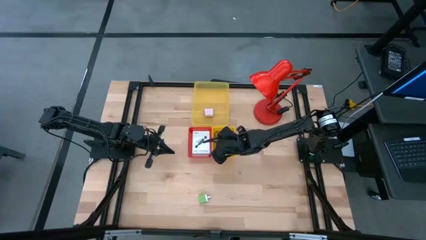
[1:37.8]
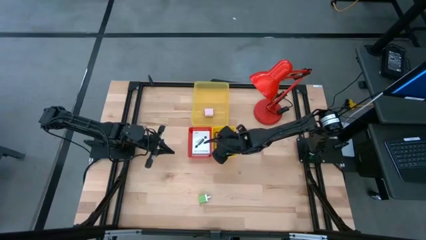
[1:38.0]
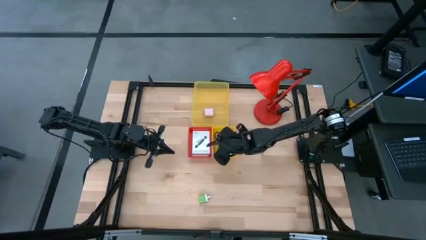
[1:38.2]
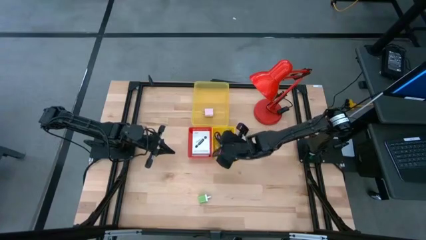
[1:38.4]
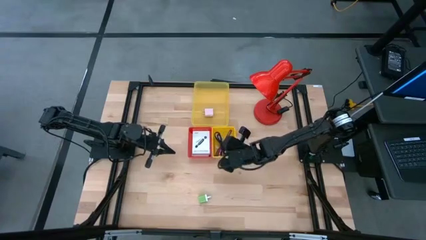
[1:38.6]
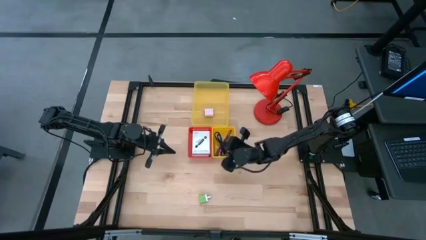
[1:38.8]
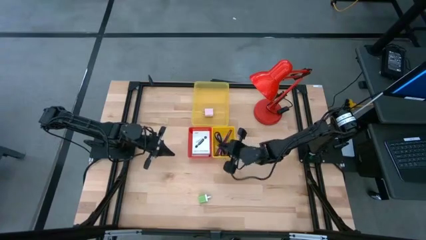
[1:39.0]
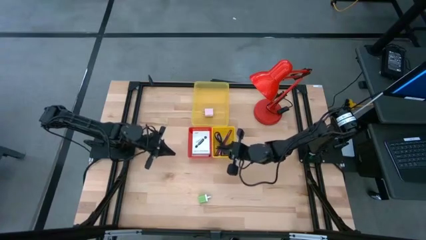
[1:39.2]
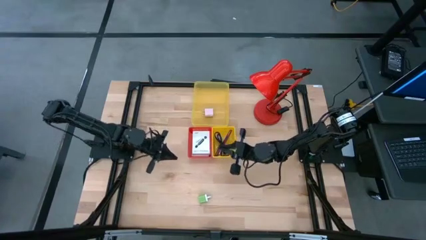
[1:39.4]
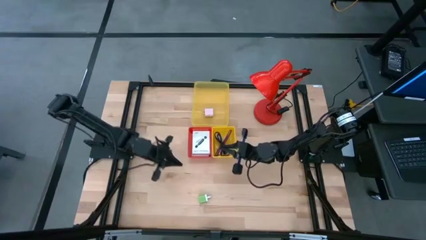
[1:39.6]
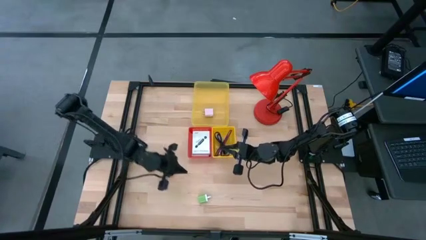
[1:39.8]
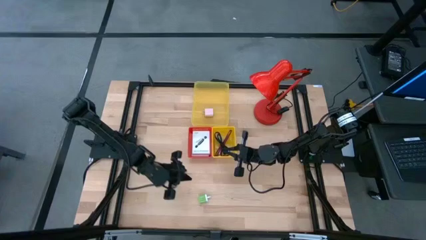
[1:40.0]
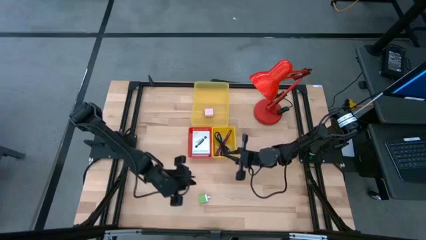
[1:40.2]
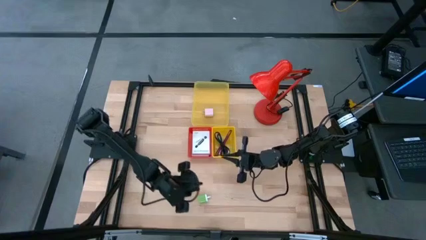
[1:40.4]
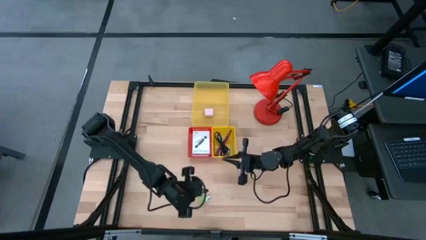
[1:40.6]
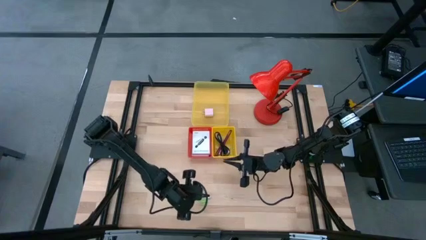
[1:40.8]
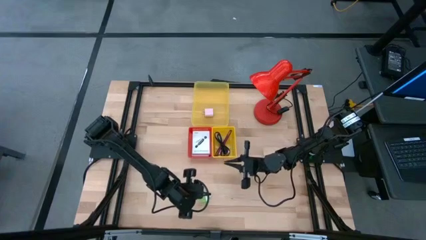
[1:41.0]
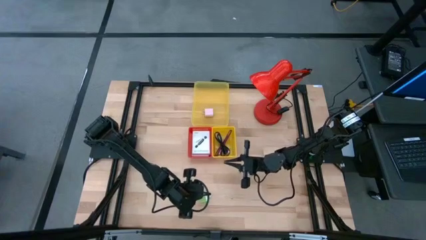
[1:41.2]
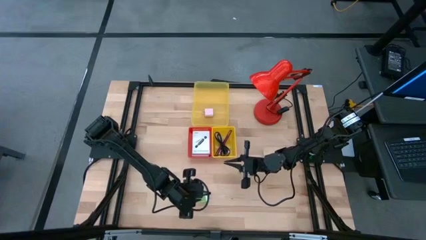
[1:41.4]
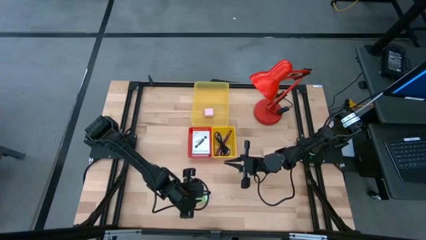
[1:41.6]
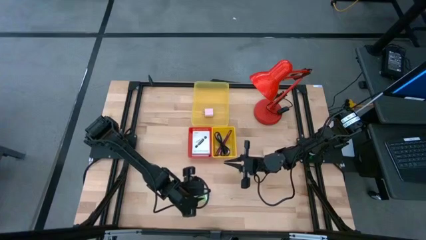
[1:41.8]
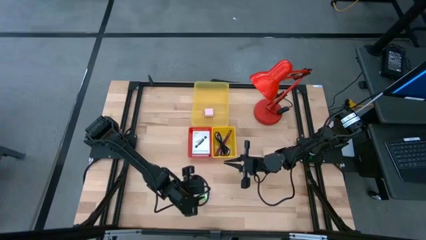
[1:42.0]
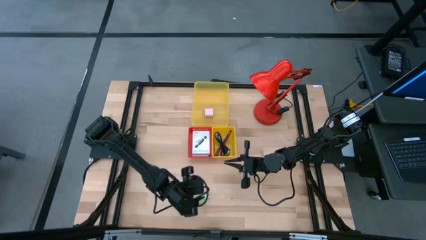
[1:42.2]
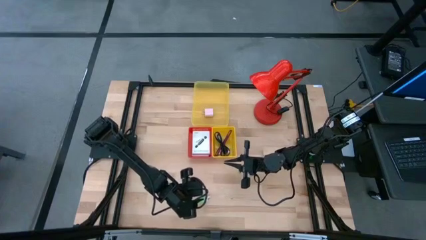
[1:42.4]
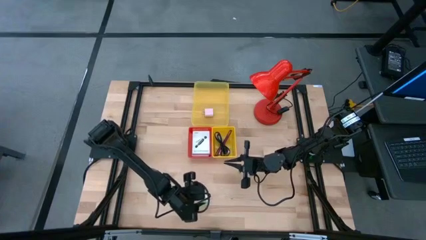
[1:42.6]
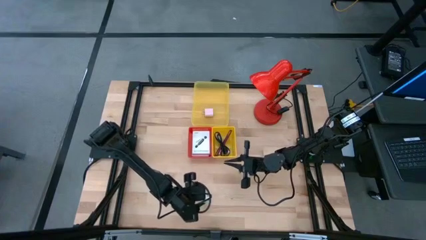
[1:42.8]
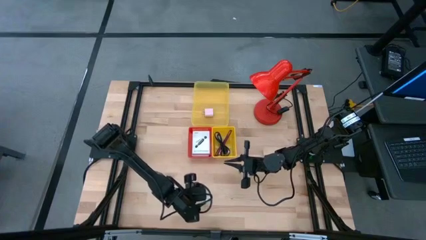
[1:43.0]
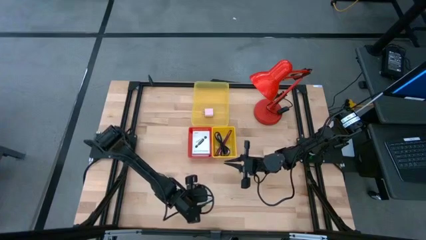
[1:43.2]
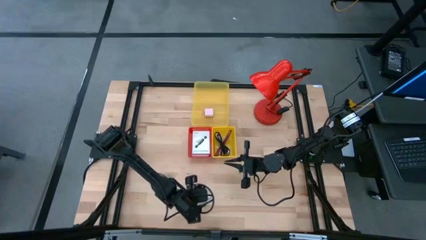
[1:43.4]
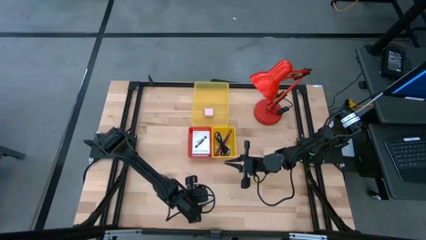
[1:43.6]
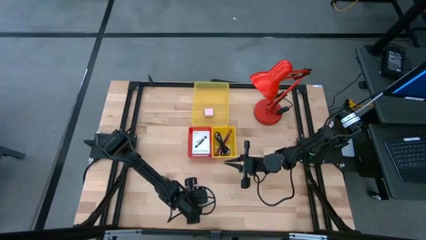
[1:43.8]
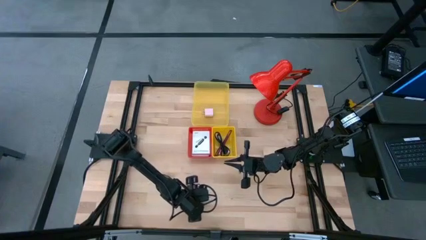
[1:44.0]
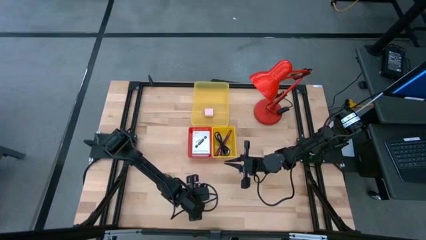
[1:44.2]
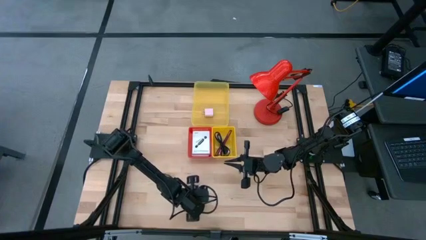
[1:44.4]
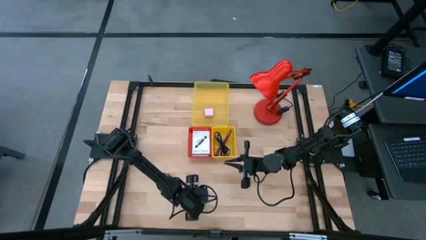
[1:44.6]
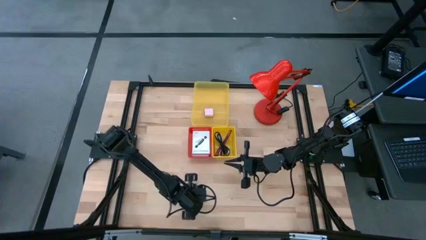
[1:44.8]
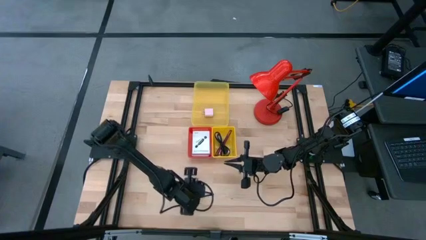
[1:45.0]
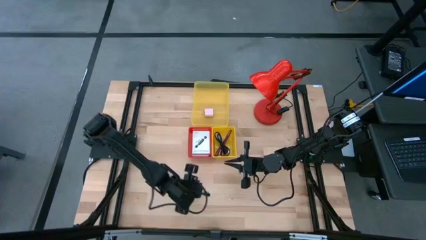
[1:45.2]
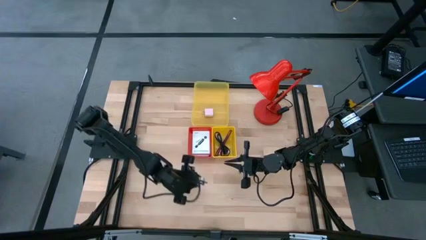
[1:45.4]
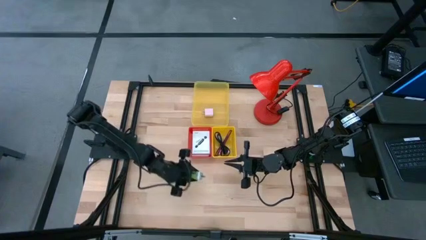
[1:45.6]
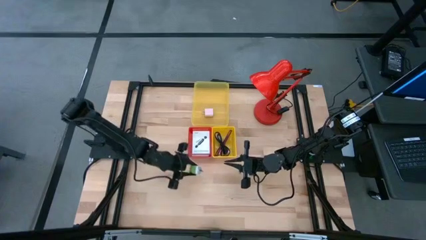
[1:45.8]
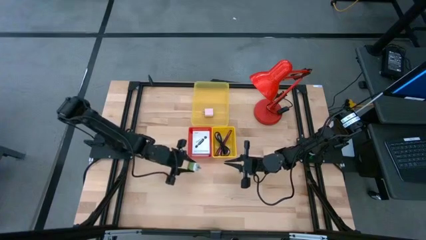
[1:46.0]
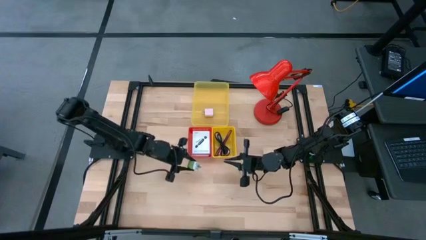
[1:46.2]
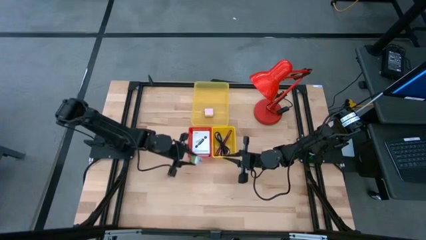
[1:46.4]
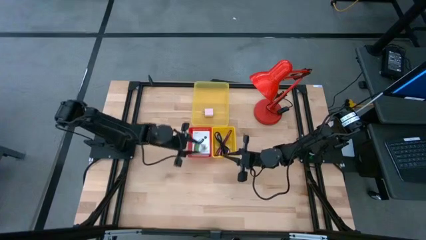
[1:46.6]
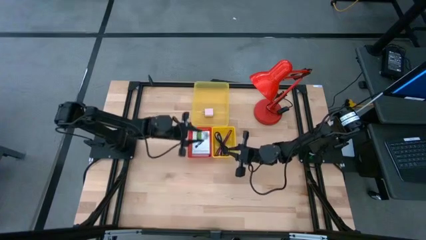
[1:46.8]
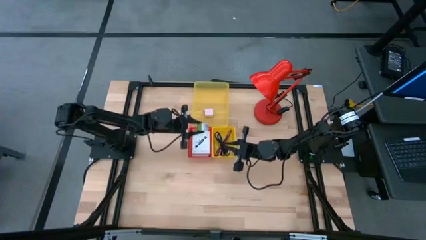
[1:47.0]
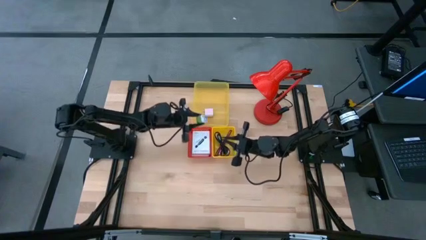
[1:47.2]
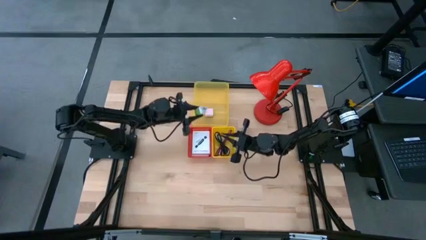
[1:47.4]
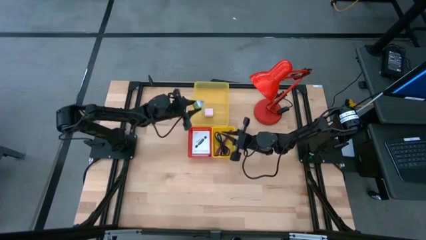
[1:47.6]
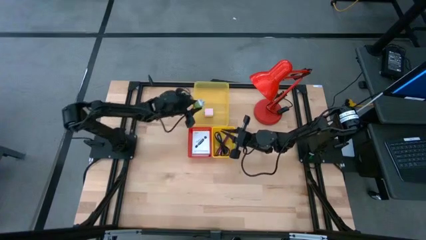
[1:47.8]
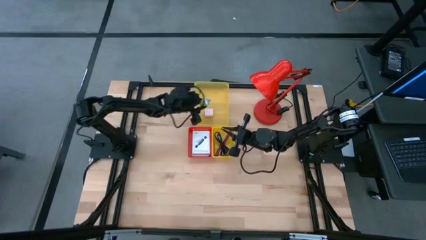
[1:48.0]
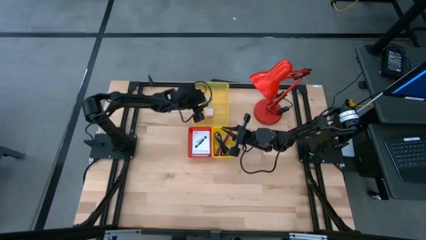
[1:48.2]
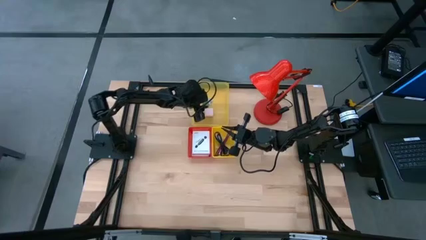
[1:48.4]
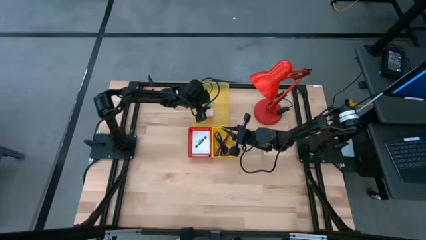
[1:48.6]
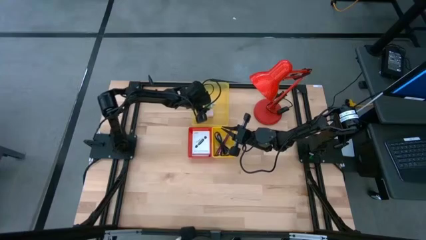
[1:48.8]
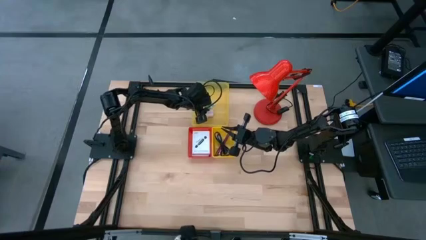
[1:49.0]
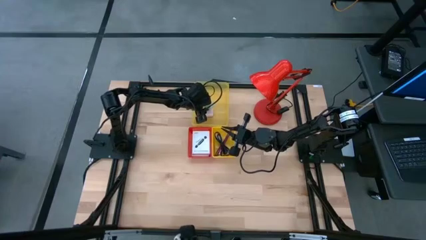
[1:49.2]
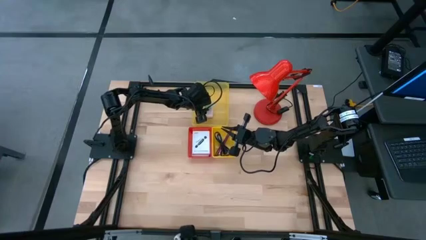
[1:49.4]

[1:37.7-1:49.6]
Task: Pick and place items into bin
Put the green charger adapter into the transparent yellow container
